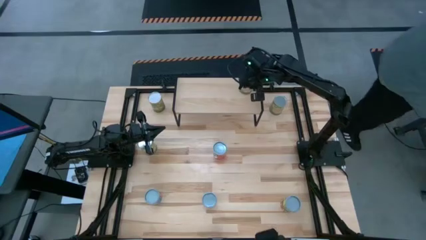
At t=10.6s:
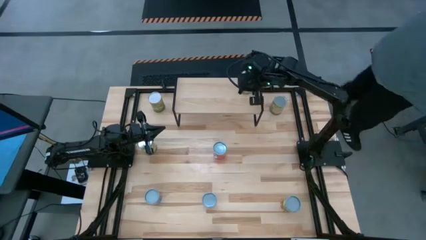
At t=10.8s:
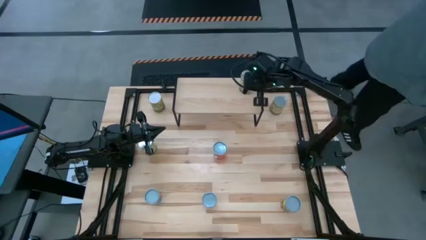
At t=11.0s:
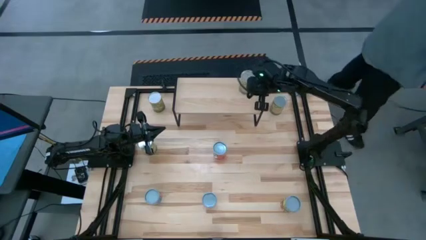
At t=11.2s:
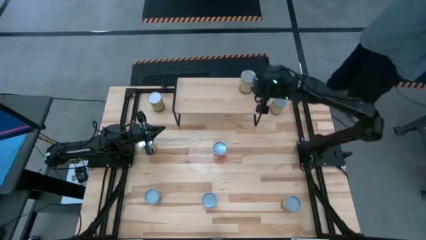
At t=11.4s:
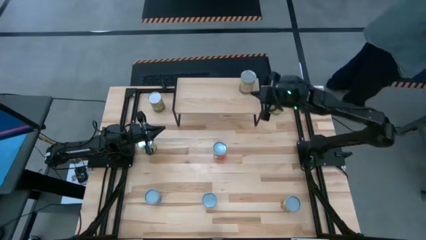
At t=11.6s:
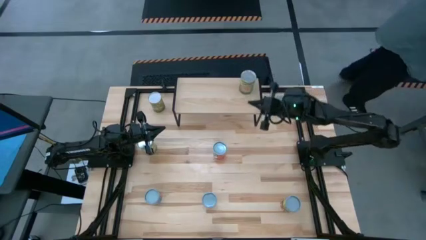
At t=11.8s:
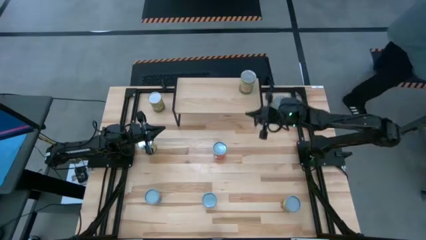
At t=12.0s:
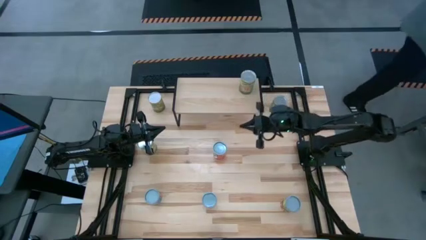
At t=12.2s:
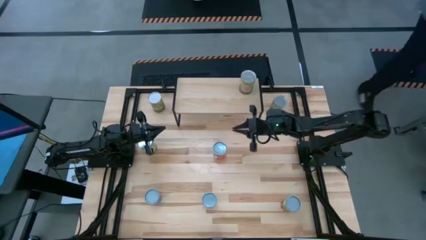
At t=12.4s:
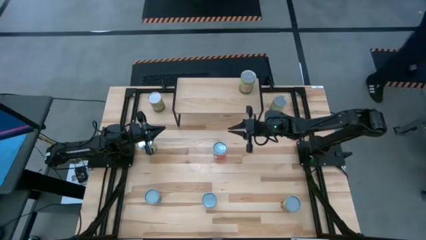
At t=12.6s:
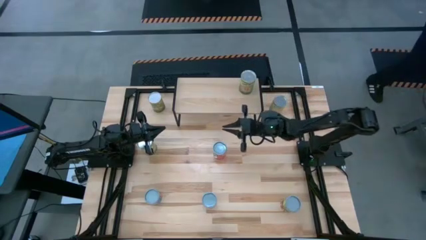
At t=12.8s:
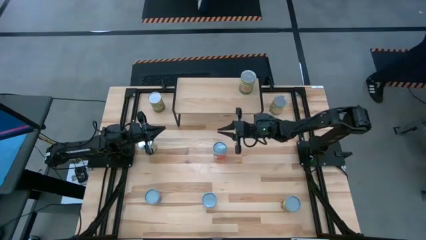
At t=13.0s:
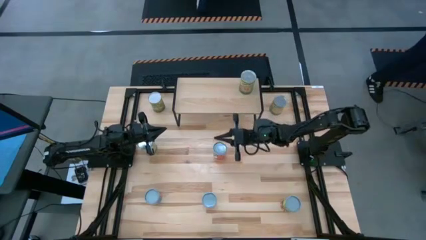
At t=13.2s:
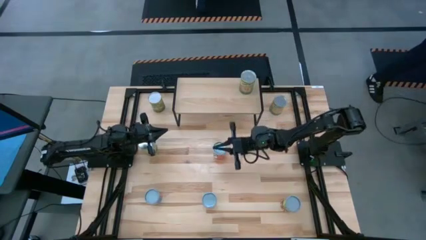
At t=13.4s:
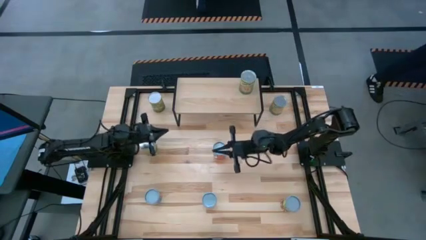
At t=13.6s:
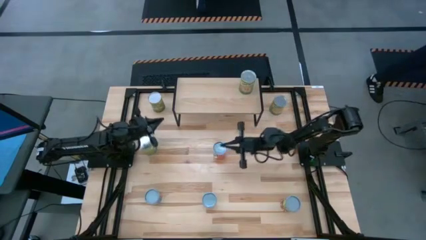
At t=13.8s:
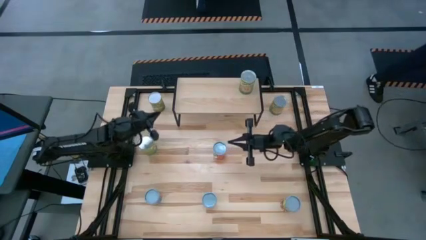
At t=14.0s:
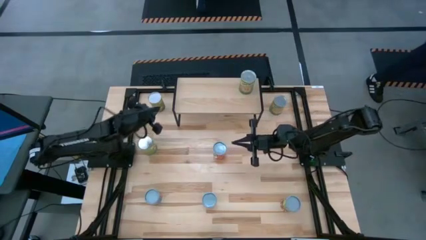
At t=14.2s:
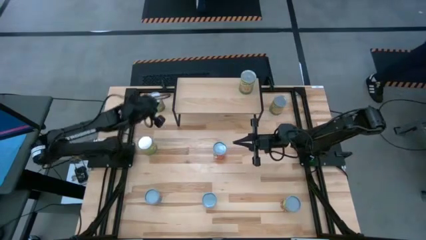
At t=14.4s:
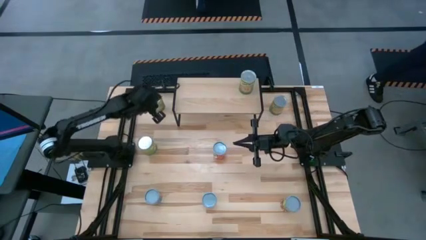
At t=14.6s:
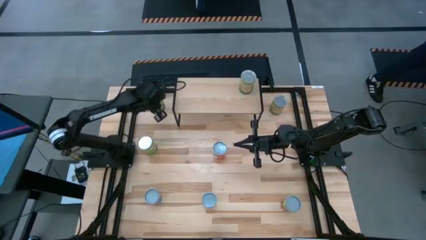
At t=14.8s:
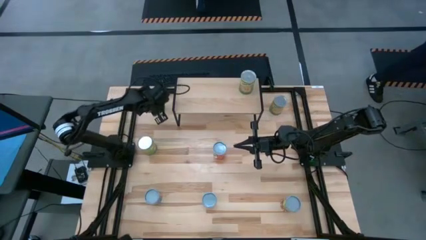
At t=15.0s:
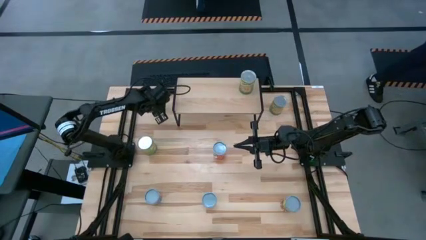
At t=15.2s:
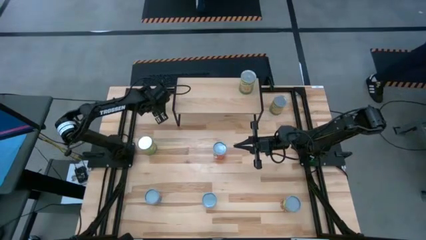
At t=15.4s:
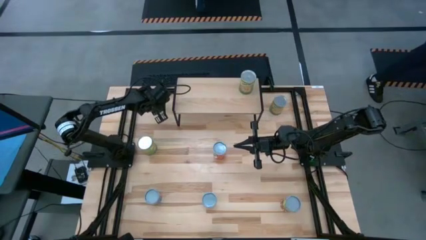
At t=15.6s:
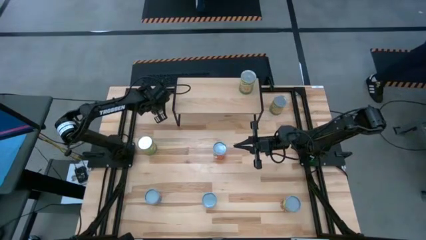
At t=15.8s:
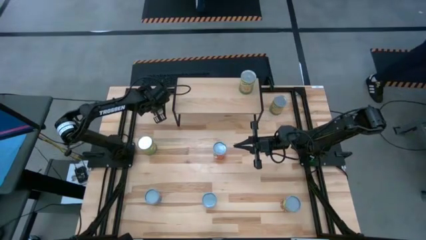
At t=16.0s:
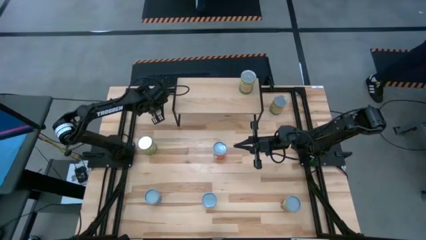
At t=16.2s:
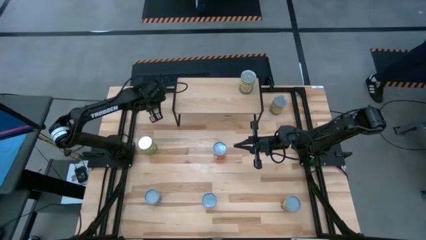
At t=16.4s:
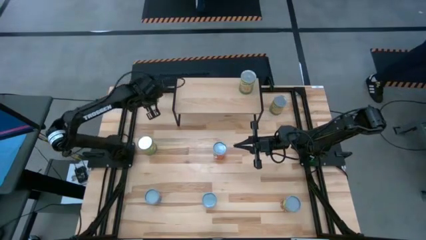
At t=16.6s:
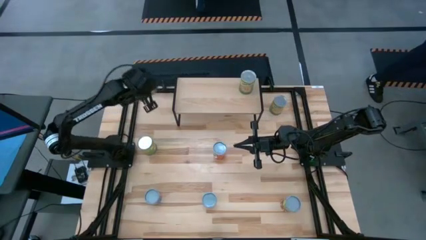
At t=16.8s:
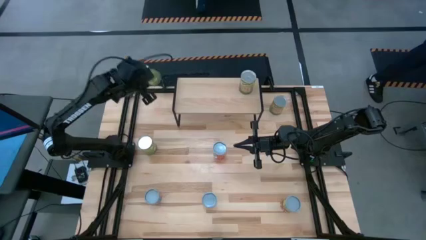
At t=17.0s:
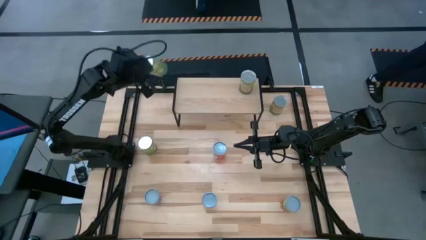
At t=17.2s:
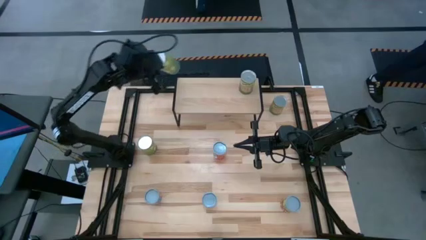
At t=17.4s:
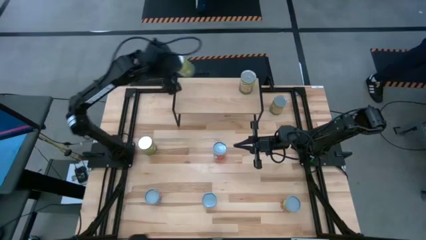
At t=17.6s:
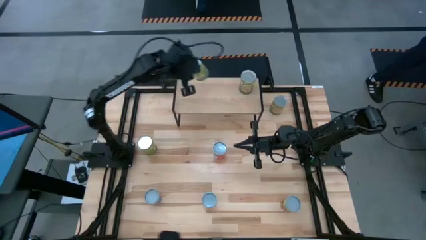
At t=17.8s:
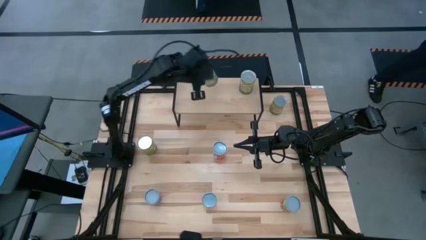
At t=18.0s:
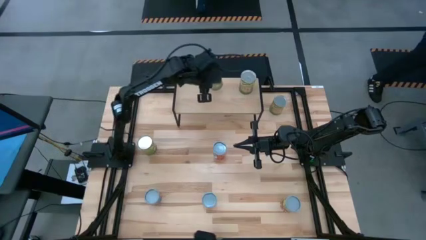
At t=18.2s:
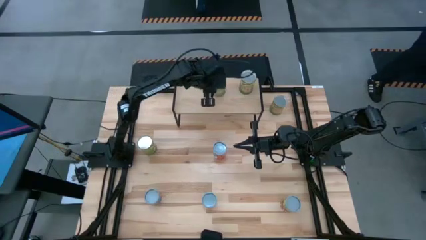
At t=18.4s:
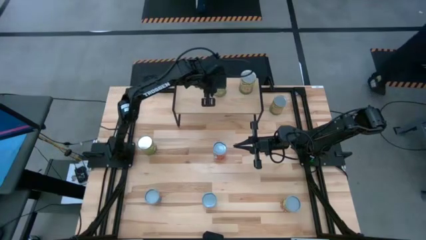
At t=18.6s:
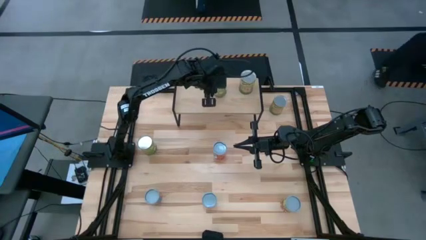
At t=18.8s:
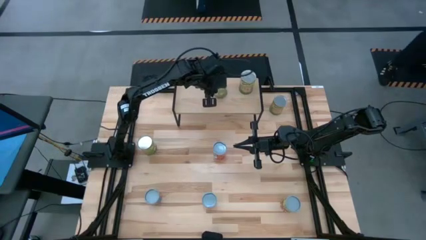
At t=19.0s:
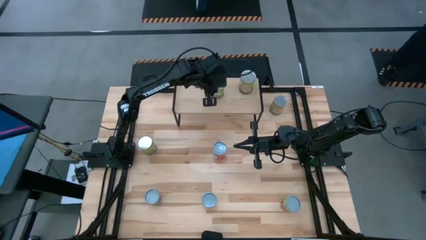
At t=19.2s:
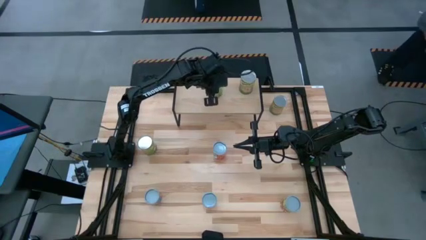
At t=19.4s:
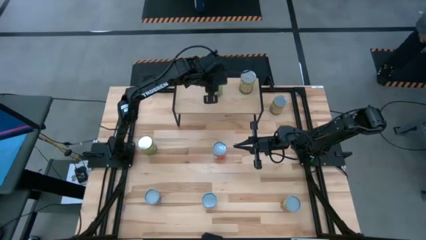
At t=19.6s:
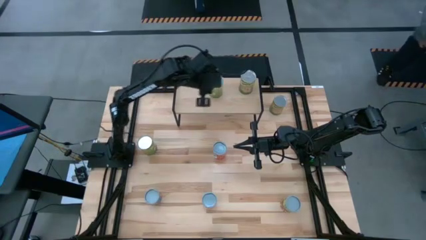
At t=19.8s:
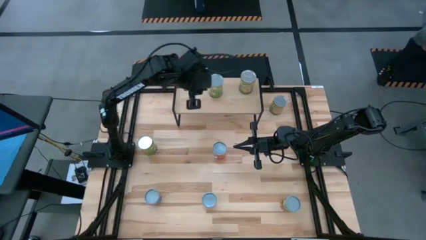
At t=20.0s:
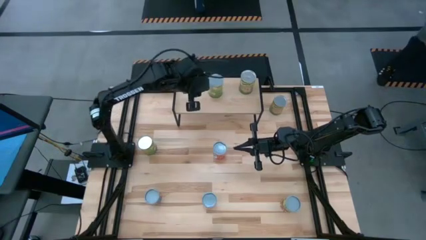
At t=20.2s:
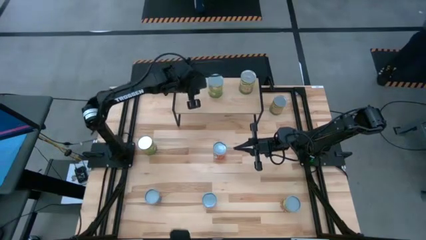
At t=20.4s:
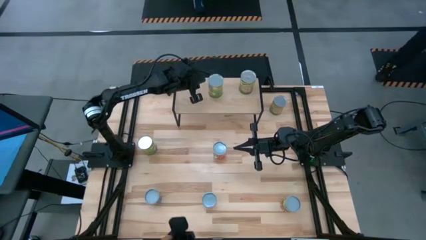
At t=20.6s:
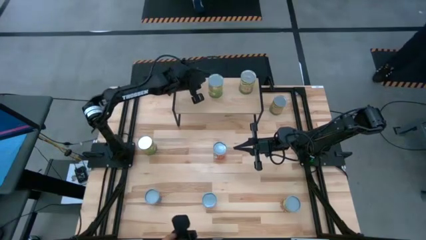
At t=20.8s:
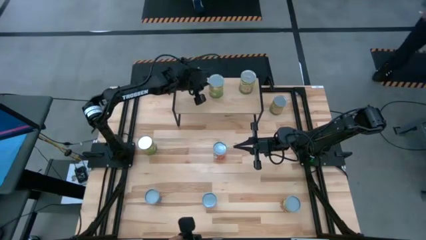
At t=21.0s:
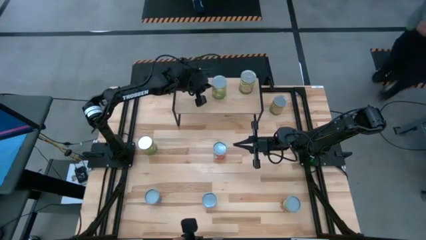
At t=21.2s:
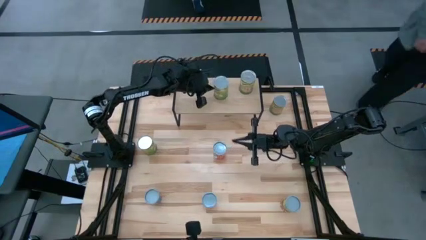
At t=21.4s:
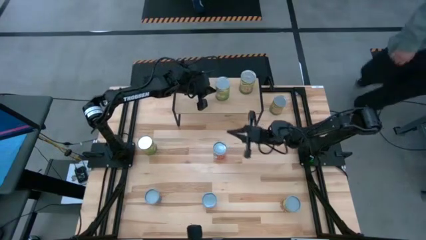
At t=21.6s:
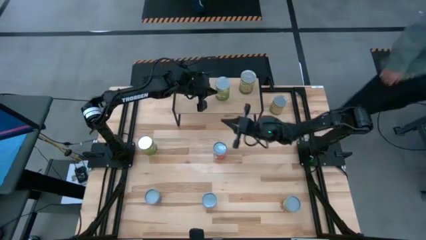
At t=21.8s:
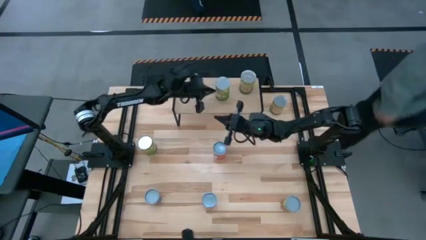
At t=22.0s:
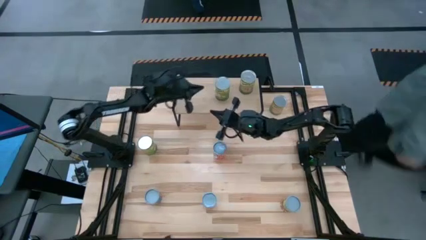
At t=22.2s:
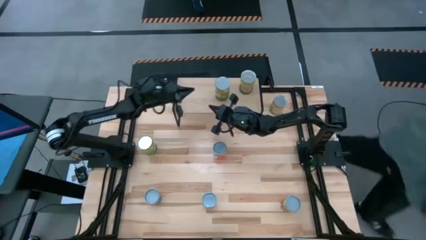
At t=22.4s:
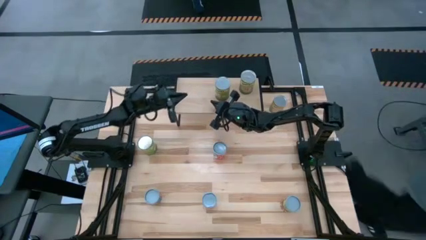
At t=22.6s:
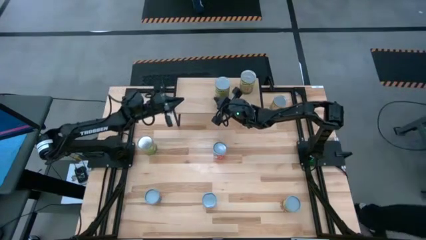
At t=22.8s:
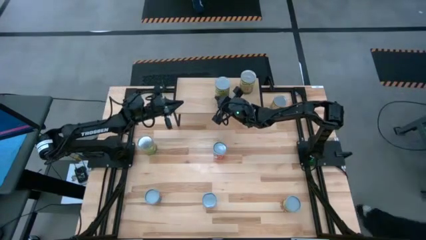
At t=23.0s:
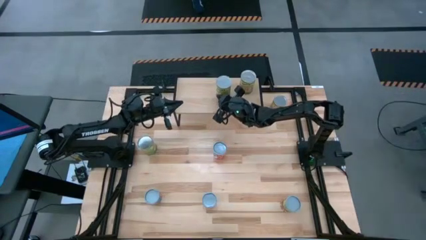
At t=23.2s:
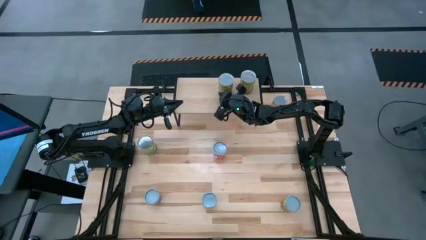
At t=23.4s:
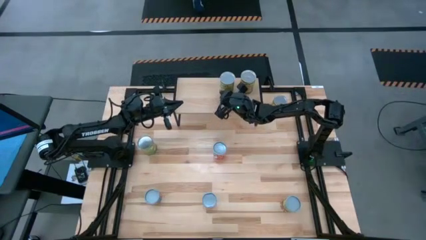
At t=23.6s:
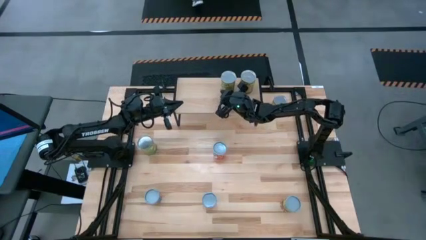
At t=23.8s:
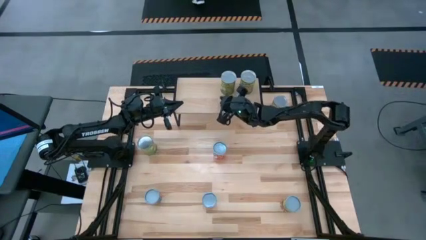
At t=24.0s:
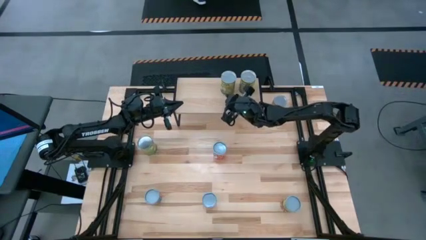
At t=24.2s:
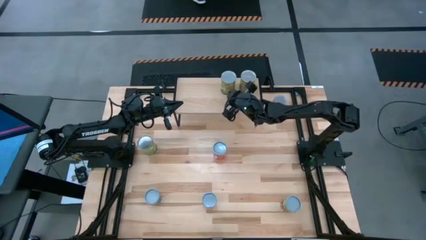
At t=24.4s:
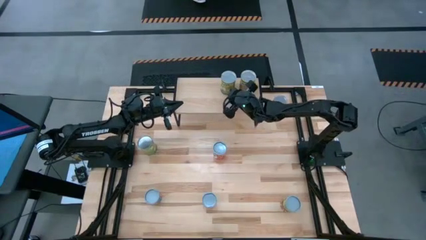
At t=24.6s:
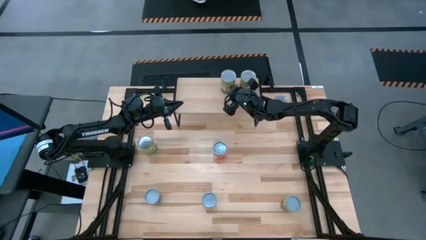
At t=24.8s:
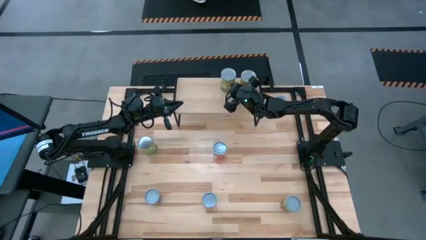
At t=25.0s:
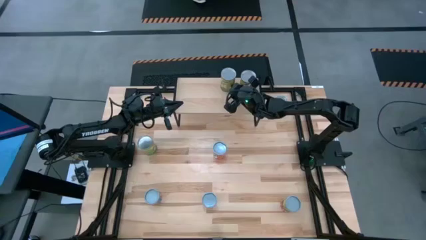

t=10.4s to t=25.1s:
Task: Pick and place cans onto a shelf
Put the top canned pears on the shelf
